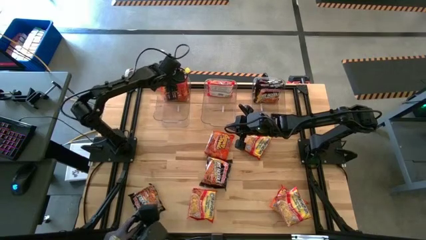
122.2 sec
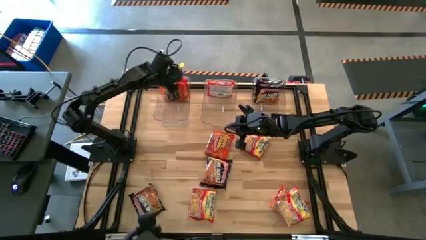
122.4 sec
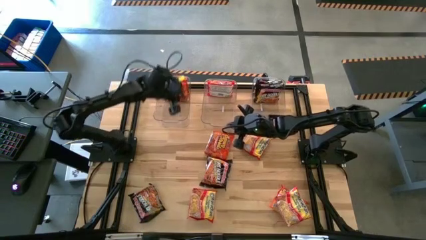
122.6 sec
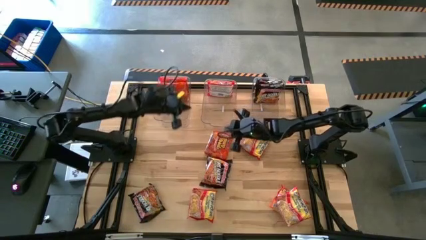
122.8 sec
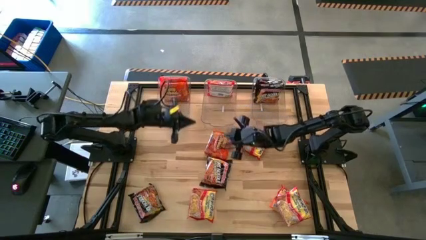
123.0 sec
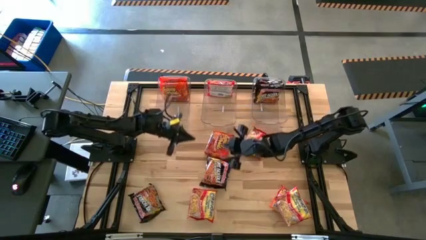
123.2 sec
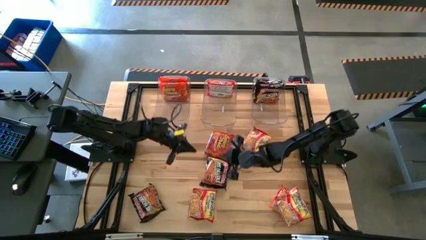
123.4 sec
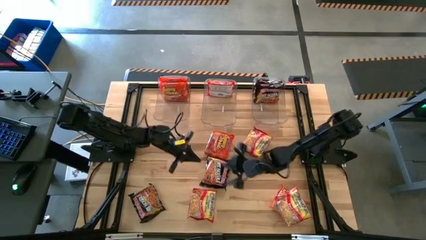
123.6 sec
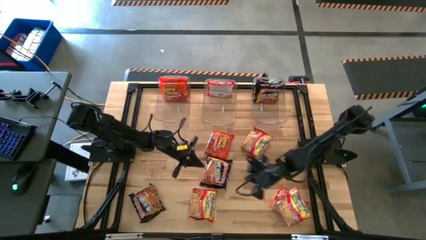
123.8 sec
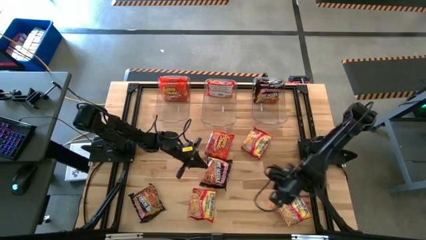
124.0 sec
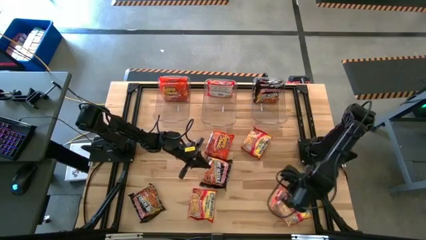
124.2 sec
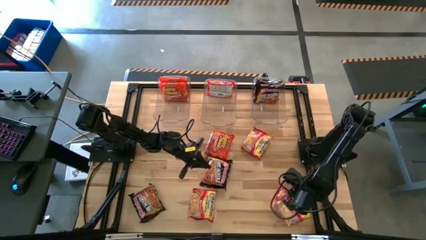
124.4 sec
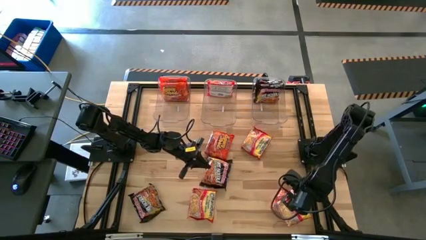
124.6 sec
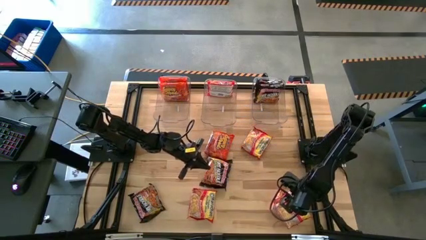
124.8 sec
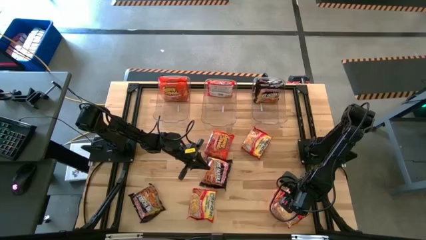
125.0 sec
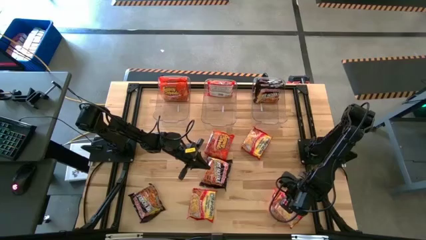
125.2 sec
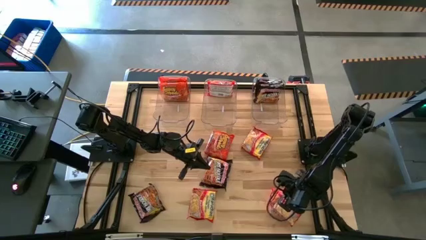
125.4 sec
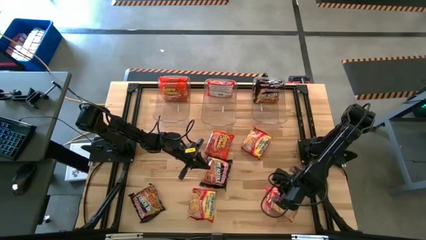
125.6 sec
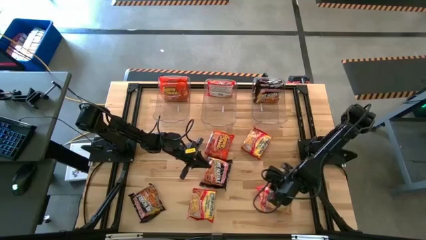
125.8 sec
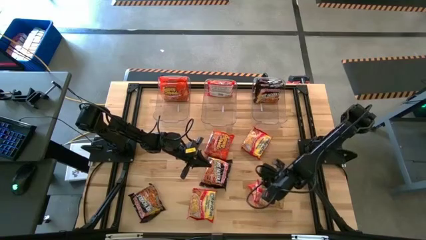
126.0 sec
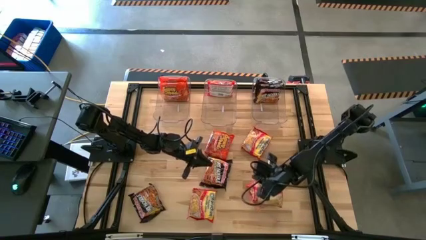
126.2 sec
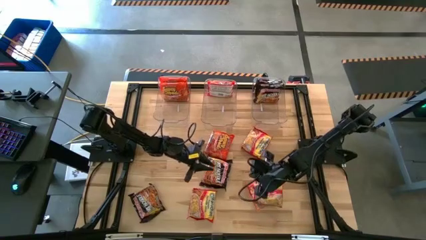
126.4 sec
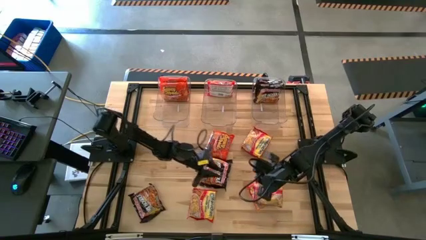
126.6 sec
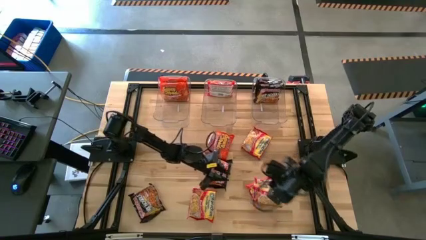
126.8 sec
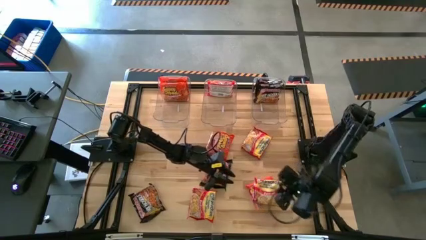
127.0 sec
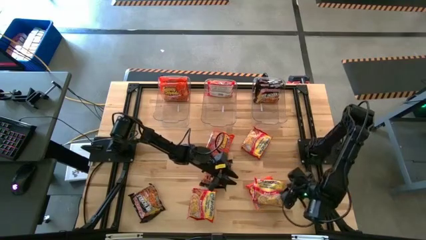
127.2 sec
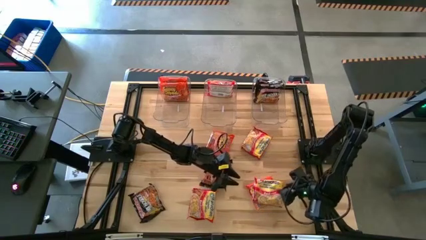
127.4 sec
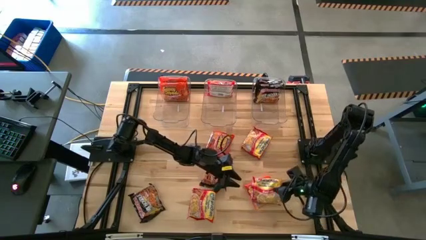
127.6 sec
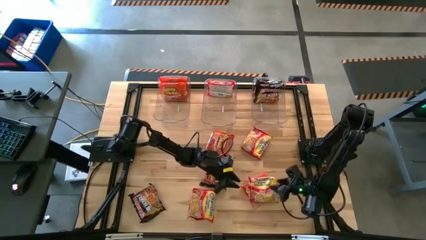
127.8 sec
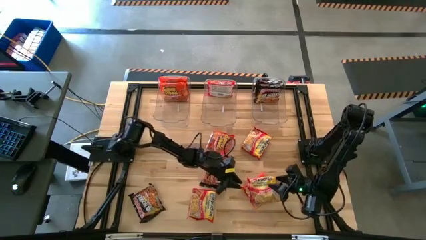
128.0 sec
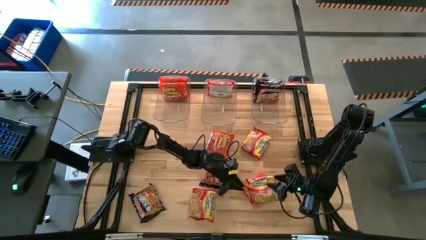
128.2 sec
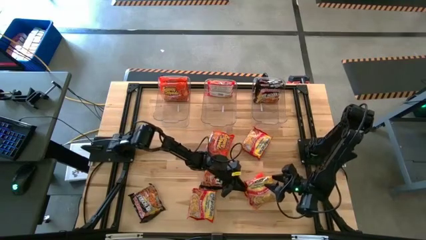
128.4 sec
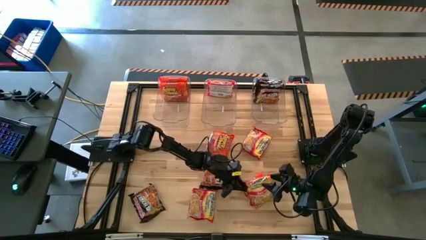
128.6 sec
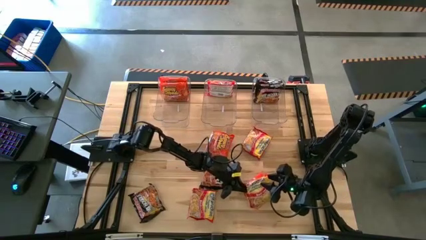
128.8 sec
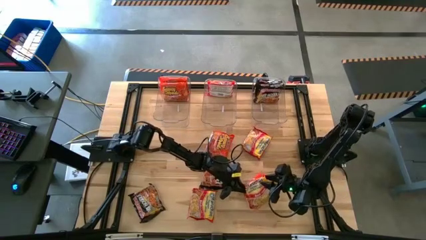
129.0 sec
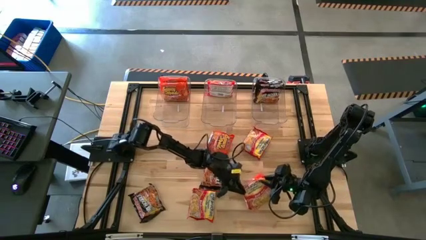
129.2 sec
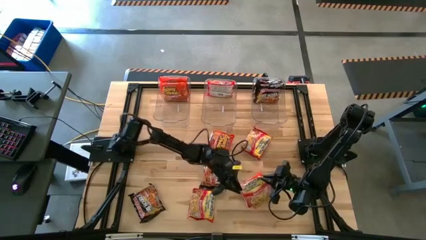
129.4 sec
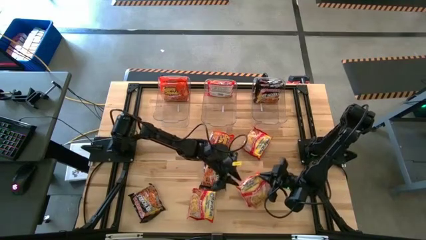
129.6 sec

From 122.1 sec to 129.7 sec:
Task: Sort Maruchan noodles
Put the red noodle pack into the middle transparent bin

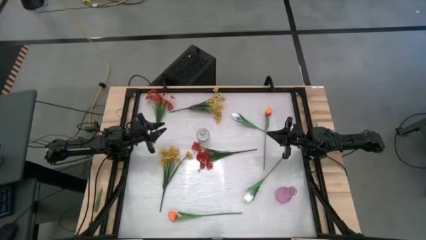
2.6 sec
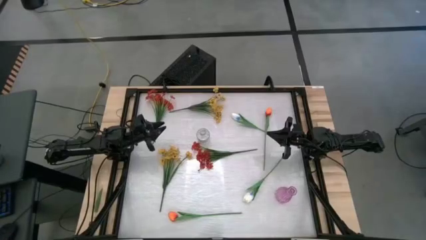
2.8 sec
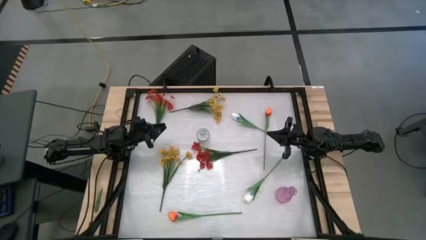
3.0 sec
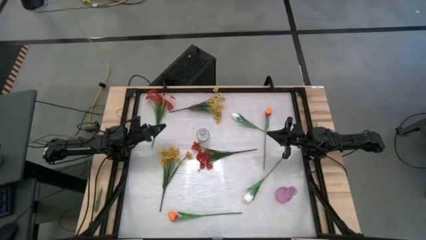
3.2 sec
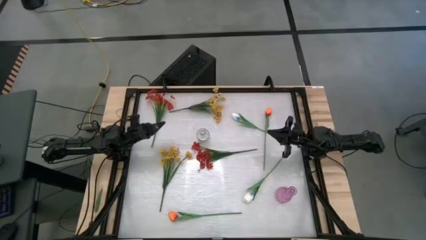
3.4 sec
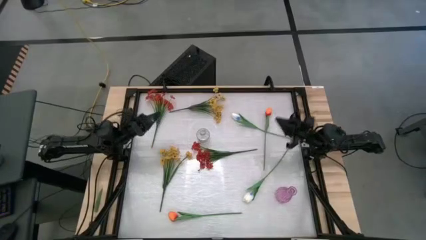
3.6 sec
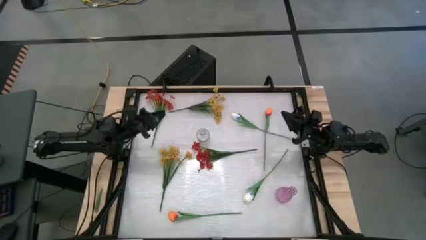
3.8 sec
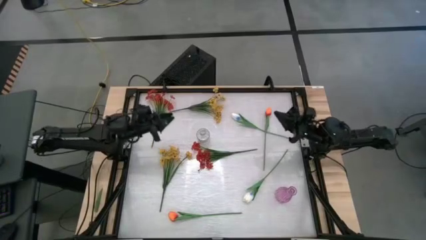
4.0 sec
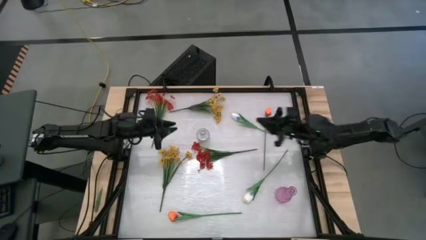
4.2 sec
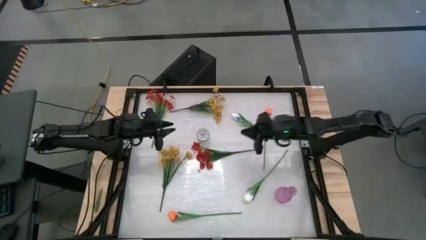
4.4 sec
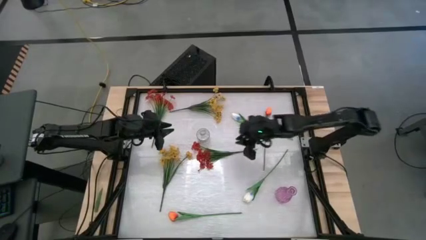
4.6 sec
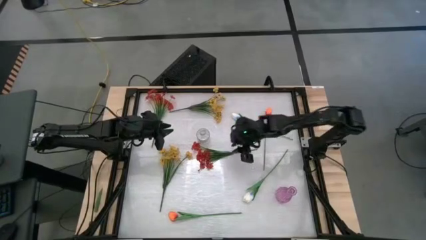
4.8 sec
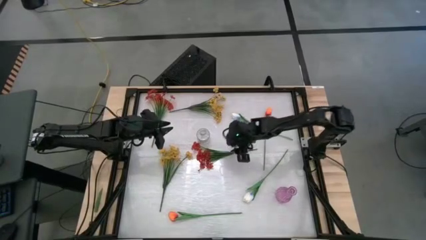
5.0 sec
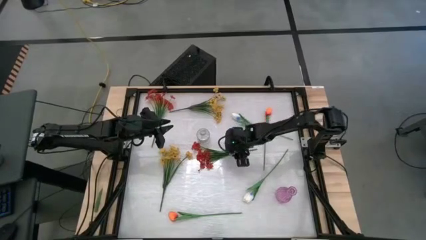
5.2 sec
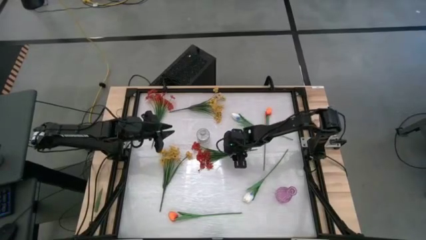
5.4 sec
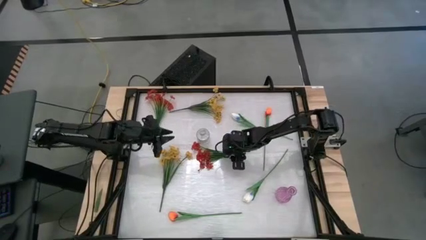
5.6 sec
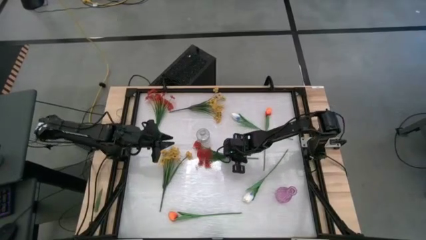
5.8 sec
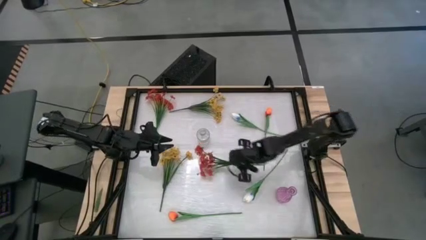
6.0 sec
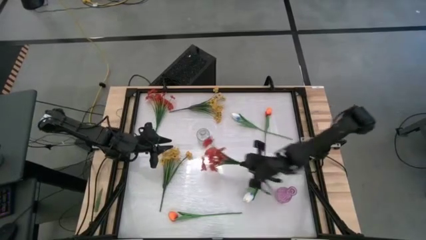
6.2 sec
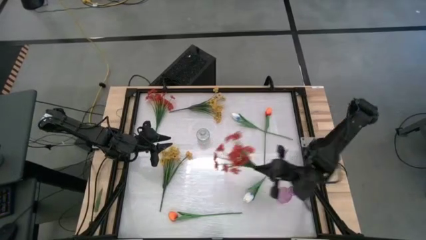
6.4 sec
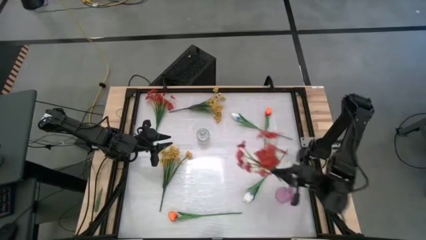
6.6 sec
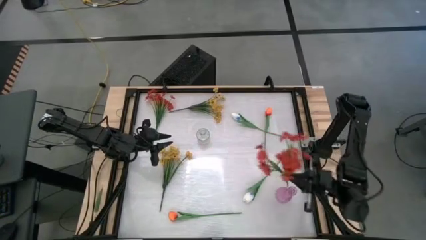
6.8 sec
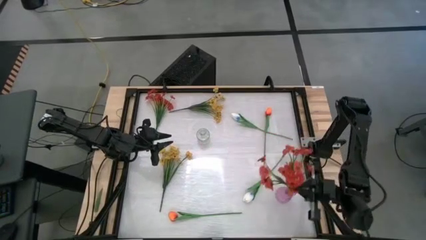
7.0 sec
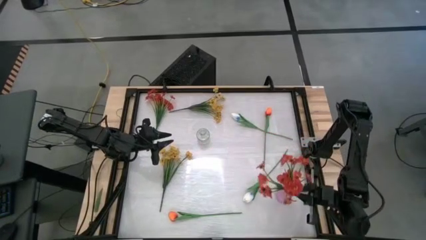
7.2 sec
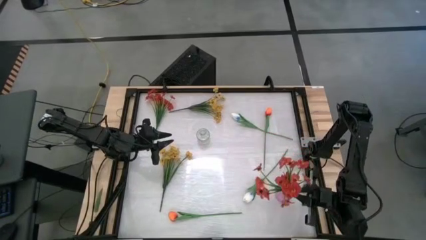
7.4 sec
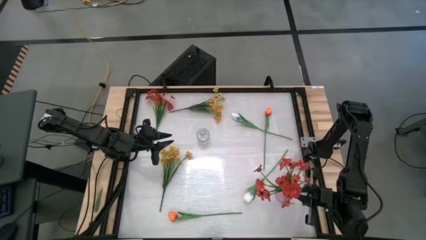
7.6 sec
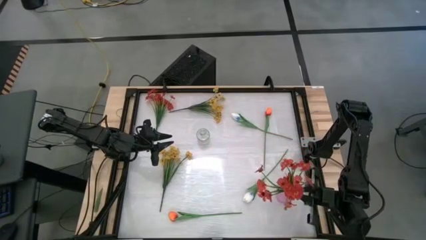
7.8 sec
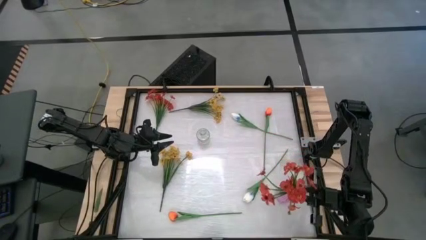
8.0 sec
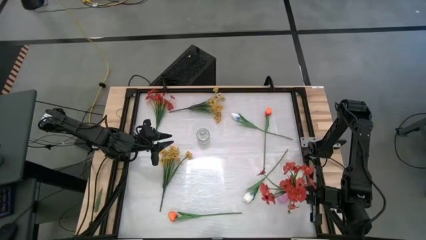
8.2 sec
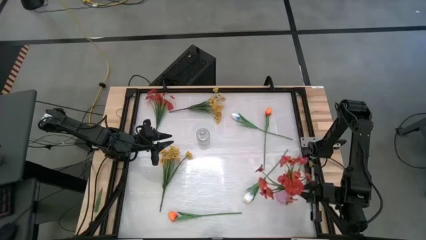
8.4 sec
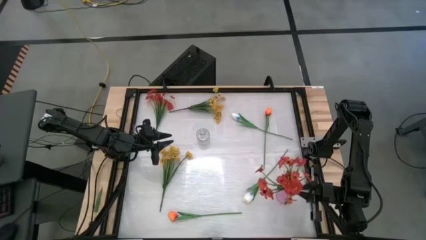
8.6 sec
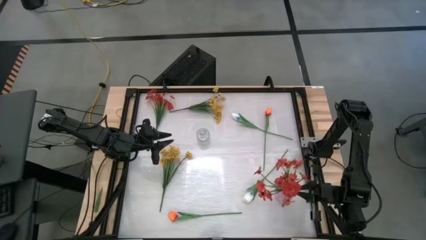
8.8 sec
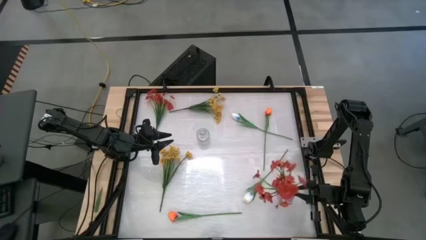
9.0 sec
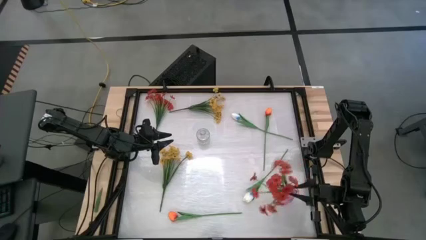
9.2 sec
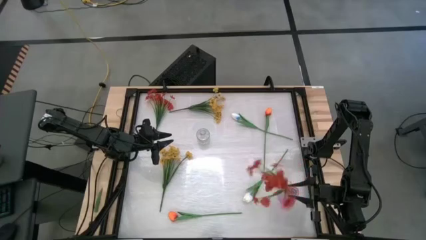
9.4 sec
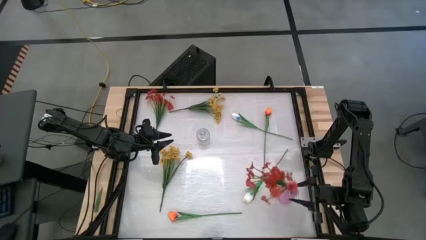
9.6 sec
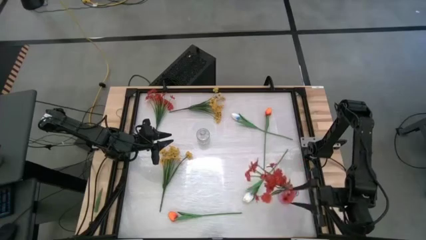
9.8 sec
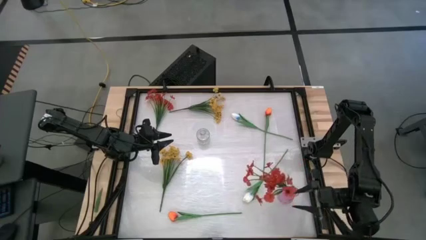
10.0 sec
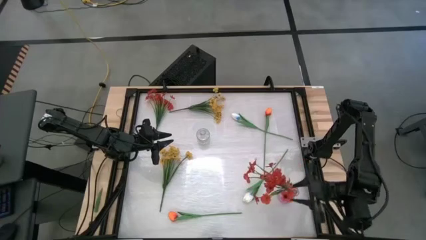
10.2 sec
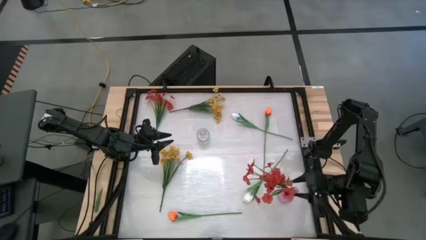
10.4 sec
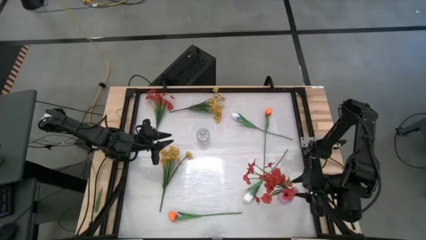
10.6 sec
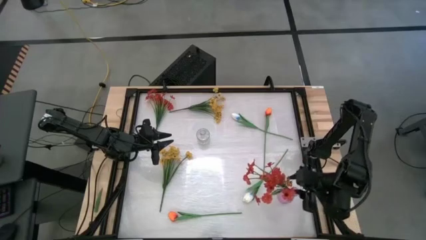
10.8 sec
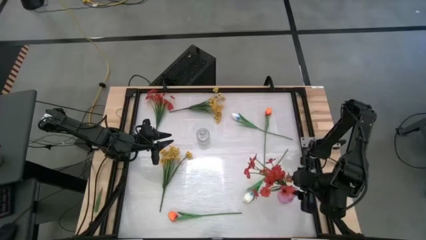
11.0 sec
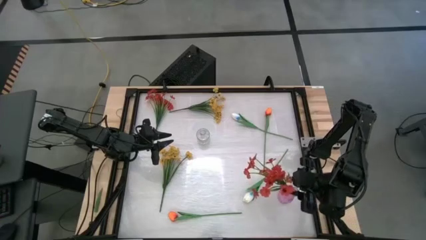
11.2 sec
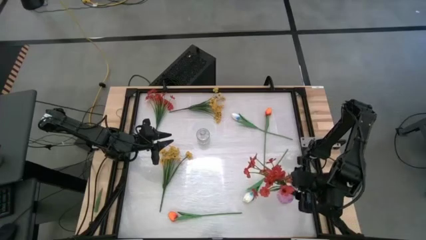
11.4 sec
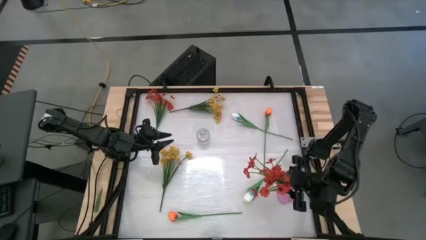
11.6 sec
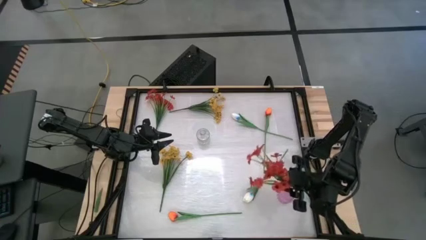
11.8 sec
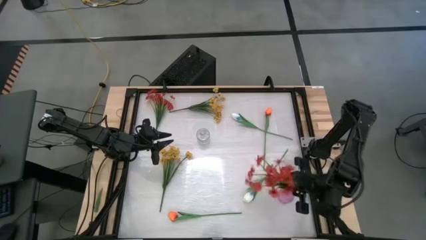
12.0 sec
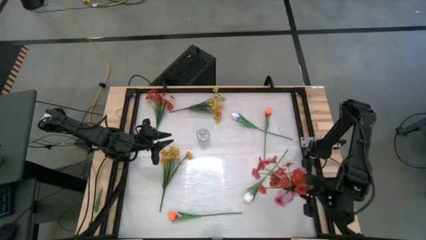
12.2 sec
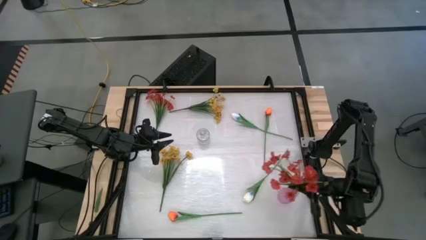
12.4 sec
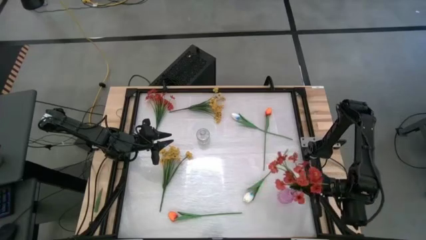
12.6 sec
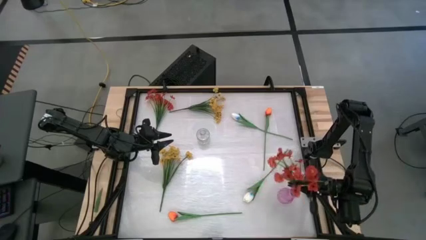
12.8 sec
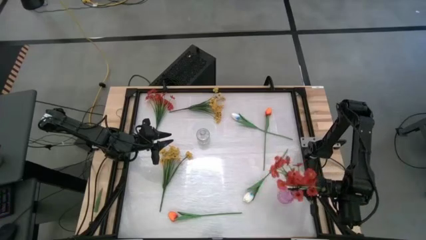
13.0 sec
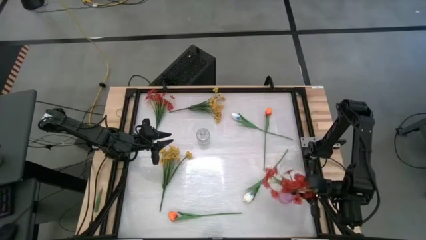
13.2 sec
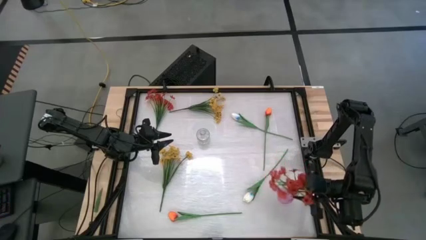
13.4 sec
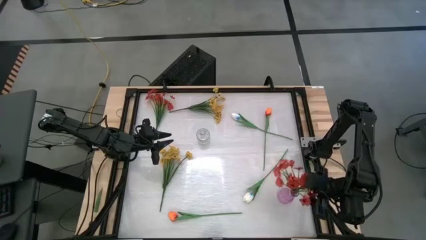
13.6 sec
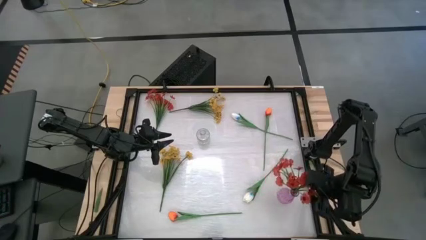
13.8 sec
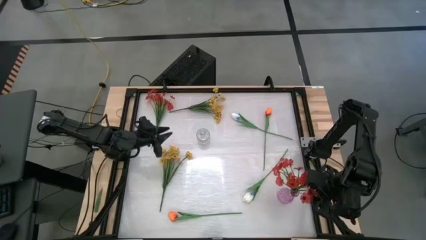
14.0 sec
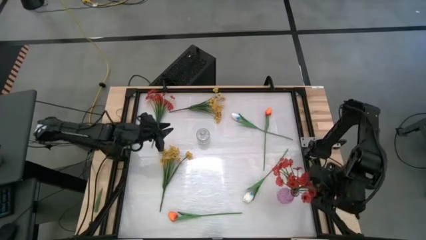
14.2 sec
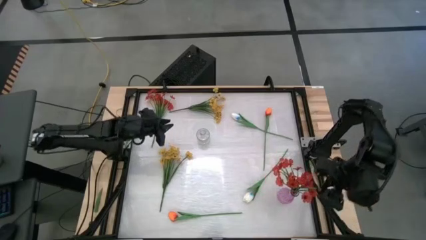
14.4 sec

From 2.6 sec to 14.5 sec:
Task: Sort flowers into vase by color
Put the bottom red flowers into the pink vase
